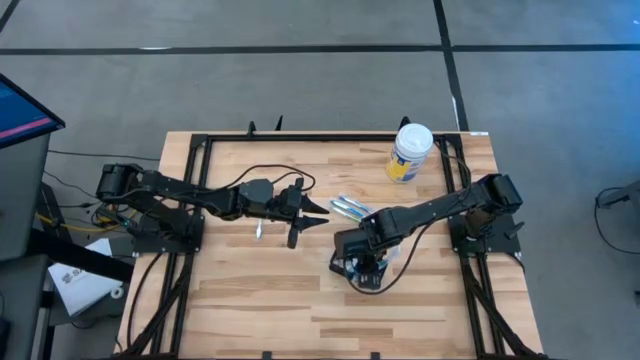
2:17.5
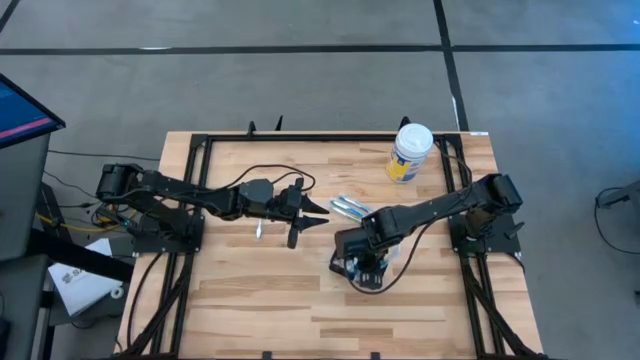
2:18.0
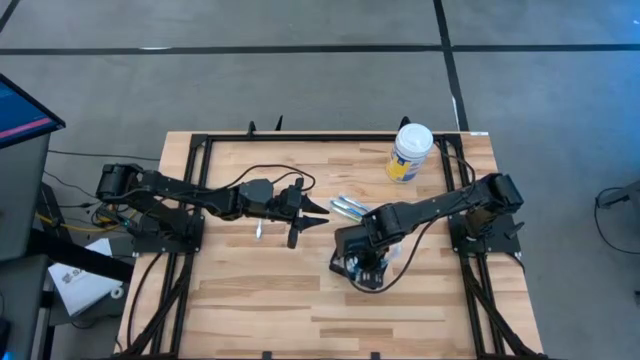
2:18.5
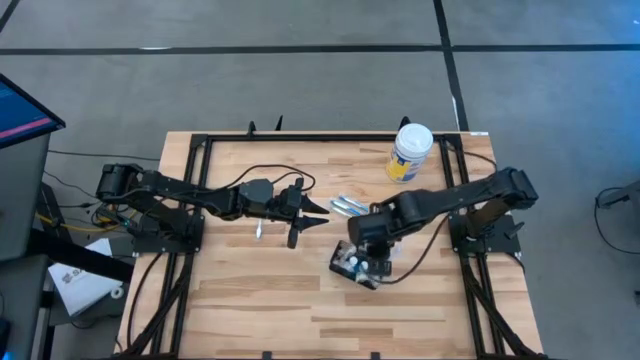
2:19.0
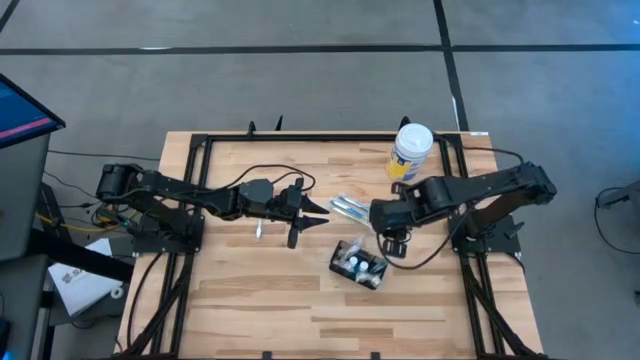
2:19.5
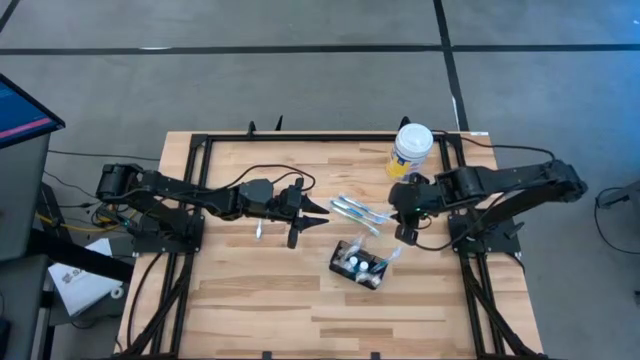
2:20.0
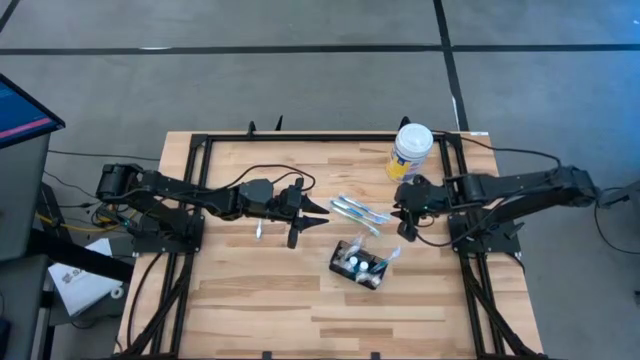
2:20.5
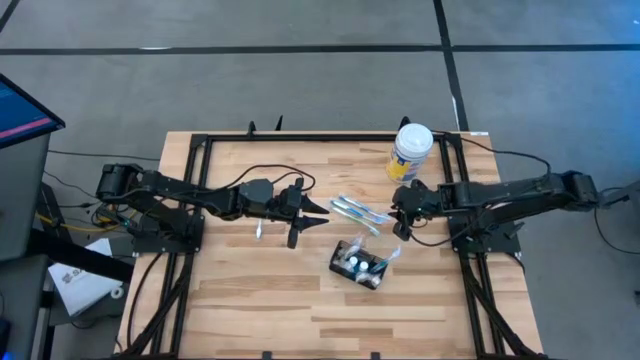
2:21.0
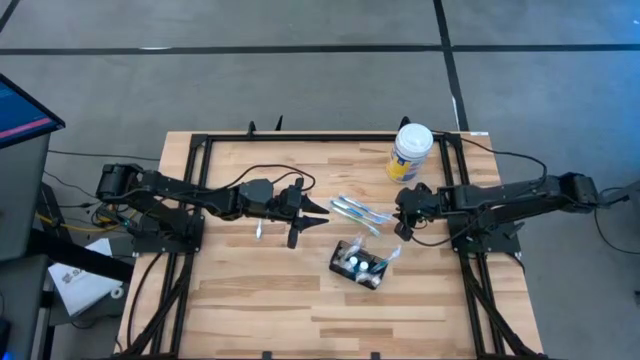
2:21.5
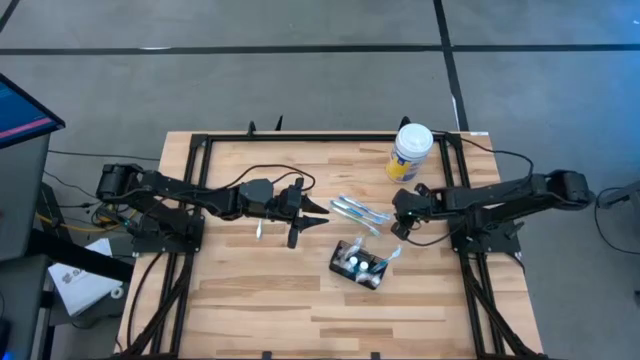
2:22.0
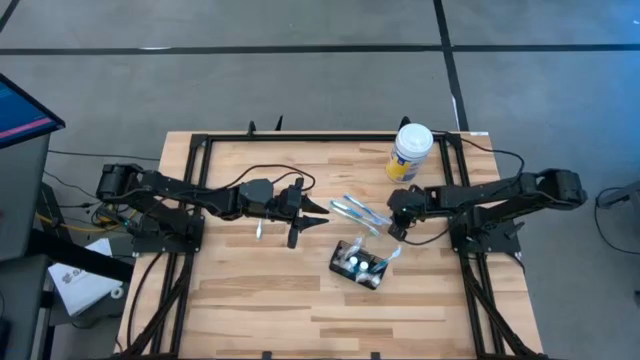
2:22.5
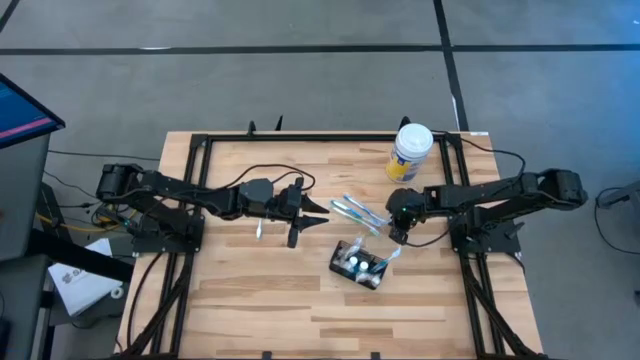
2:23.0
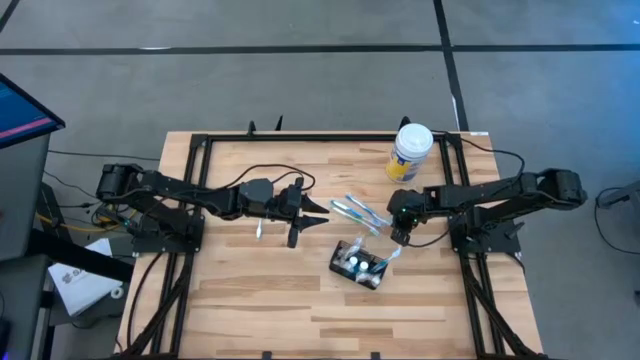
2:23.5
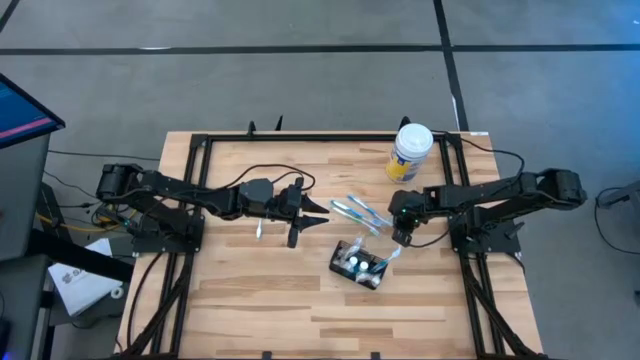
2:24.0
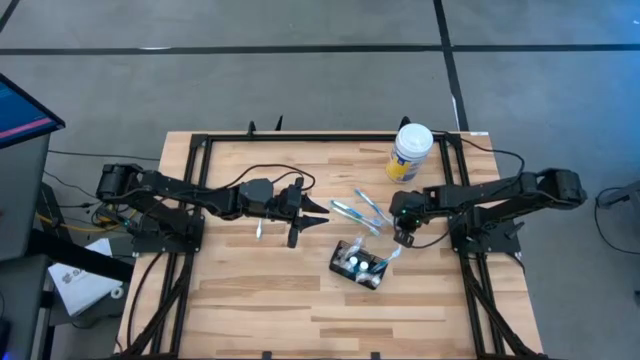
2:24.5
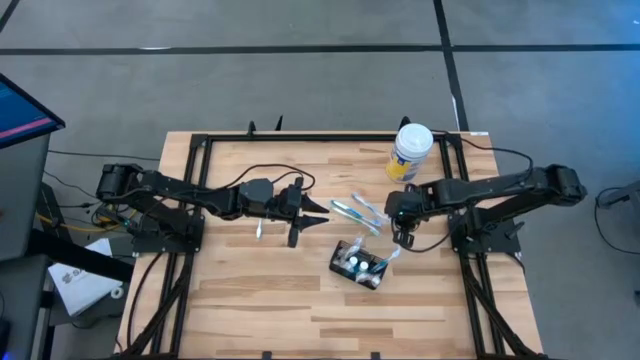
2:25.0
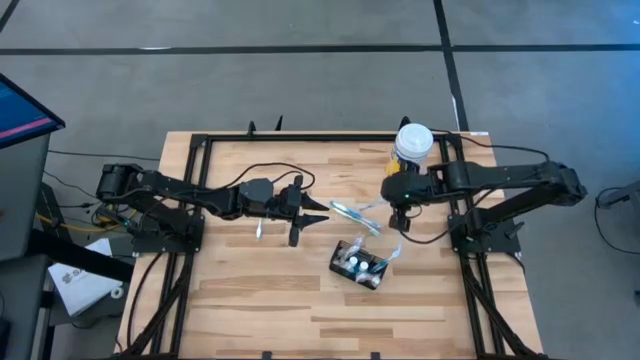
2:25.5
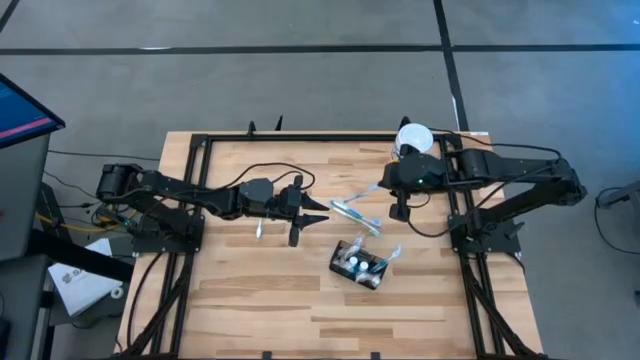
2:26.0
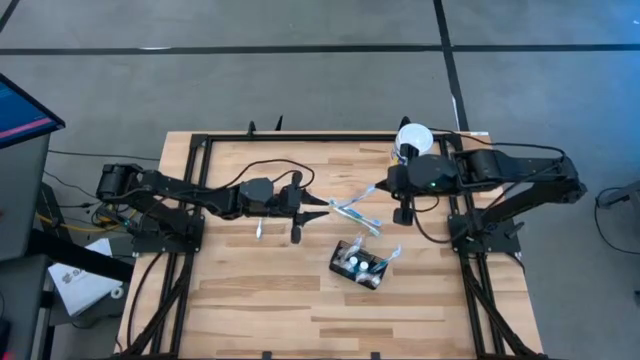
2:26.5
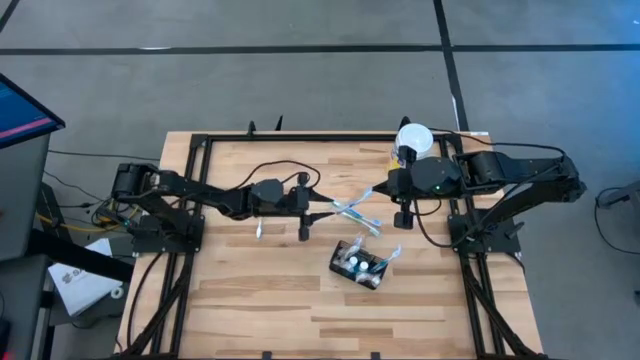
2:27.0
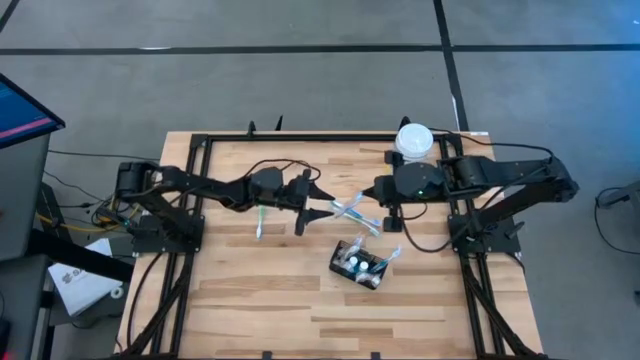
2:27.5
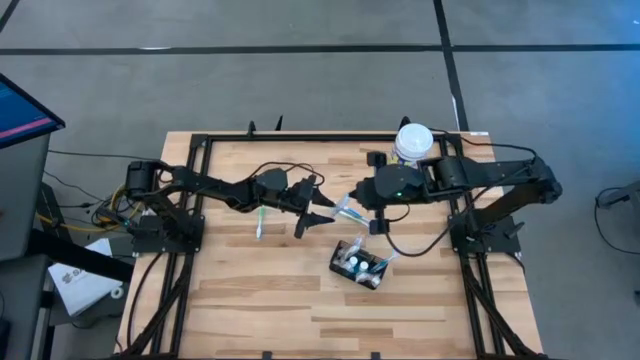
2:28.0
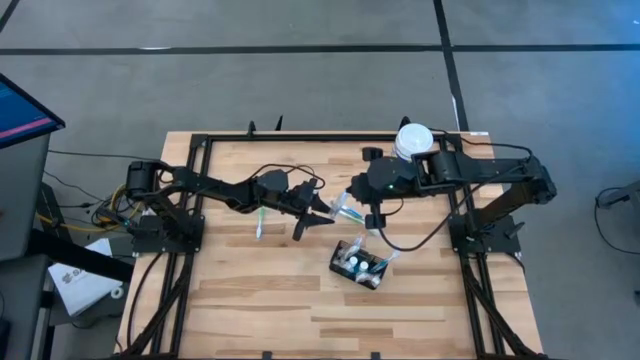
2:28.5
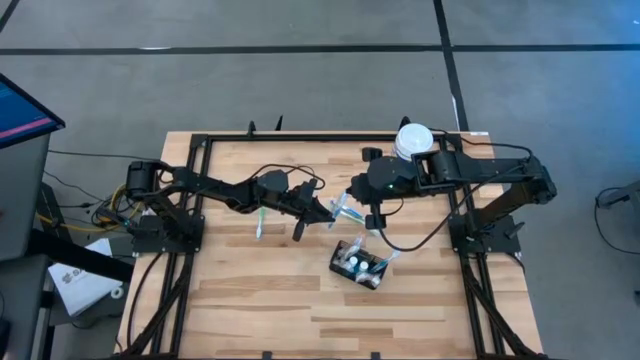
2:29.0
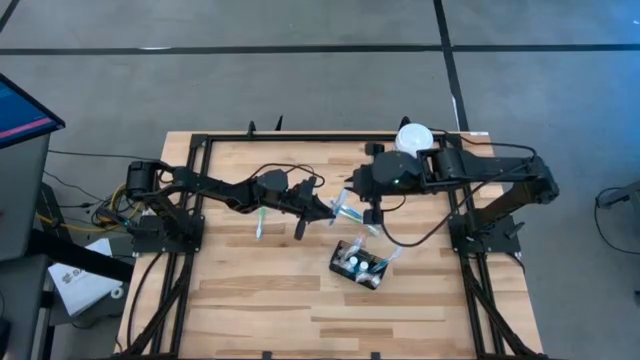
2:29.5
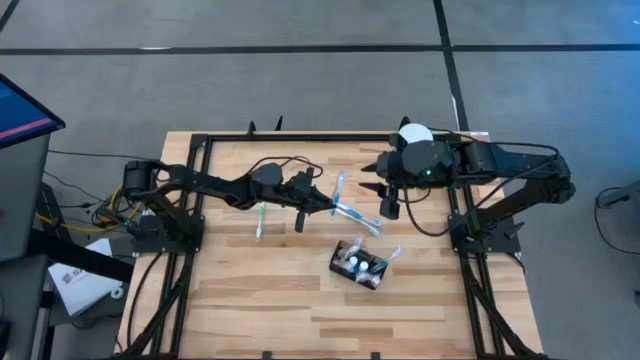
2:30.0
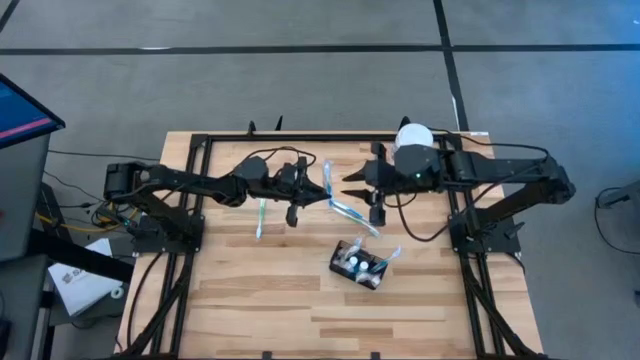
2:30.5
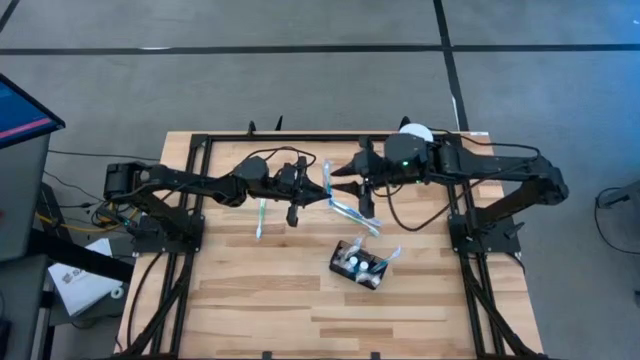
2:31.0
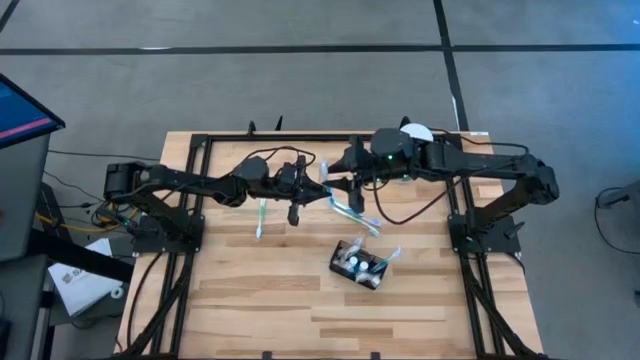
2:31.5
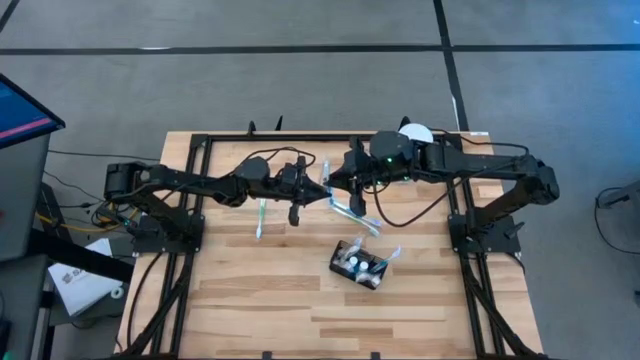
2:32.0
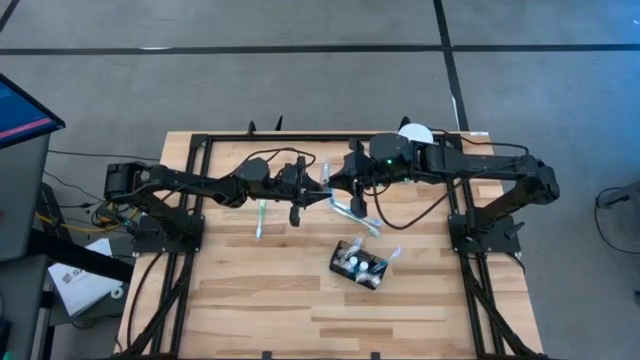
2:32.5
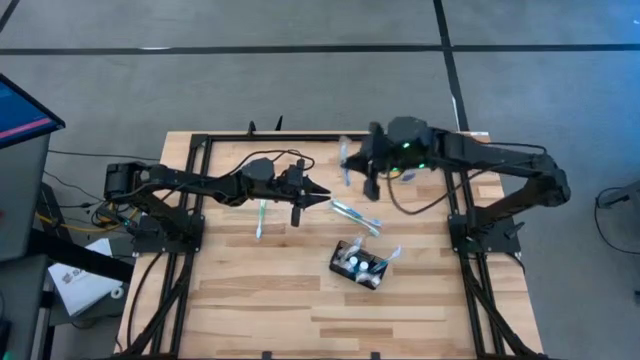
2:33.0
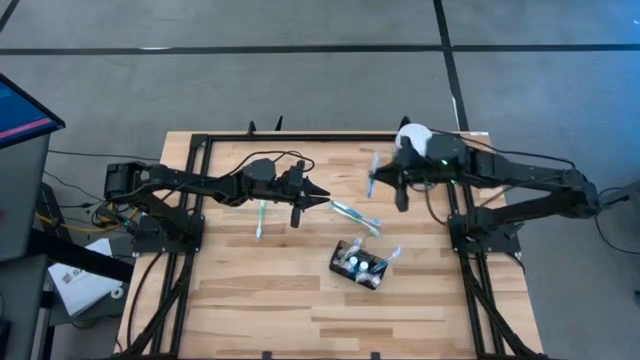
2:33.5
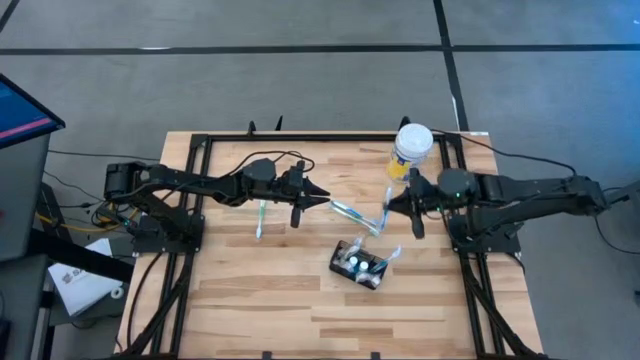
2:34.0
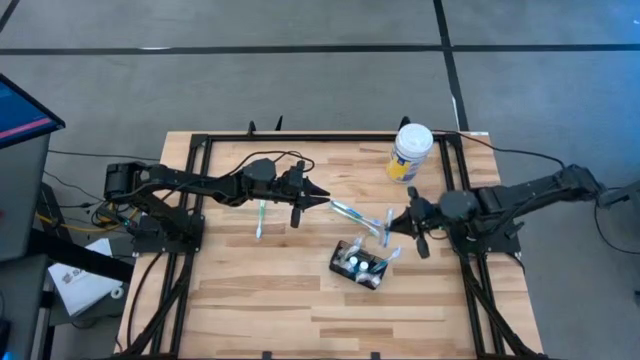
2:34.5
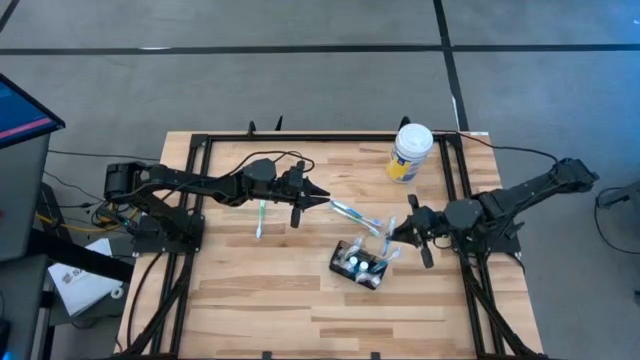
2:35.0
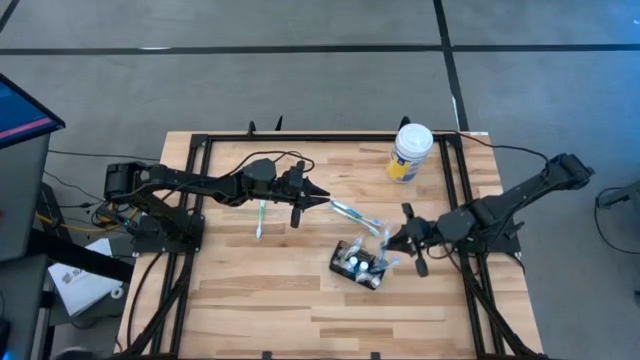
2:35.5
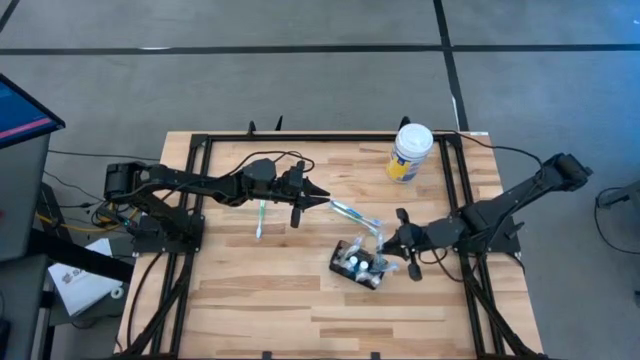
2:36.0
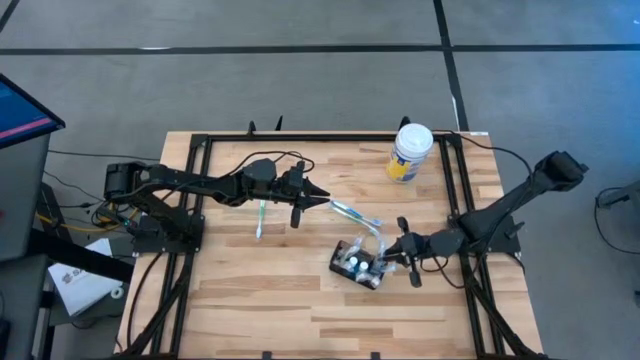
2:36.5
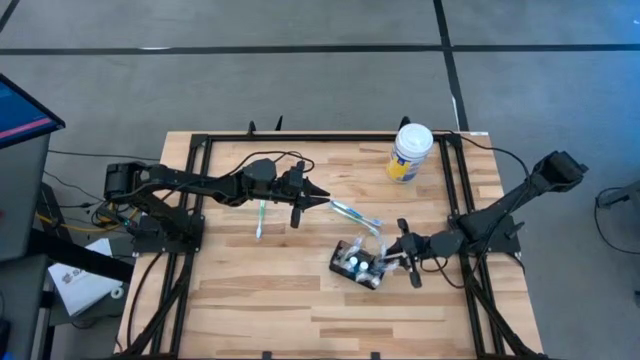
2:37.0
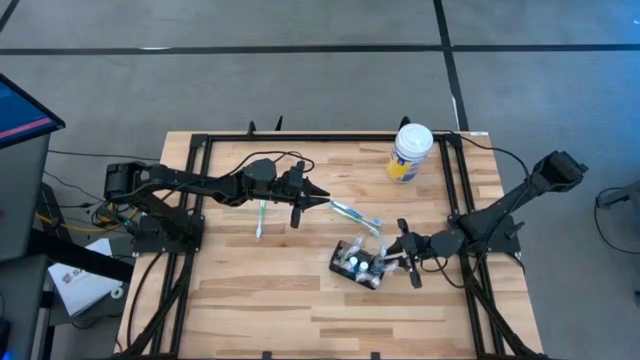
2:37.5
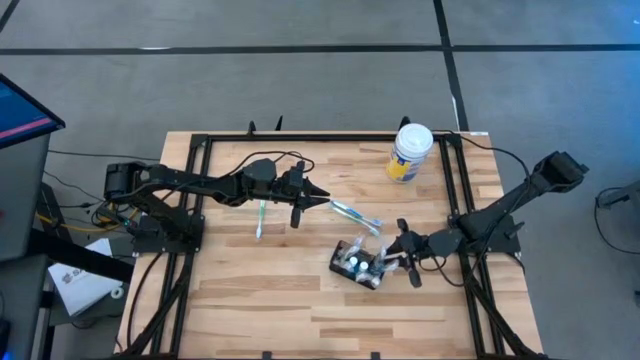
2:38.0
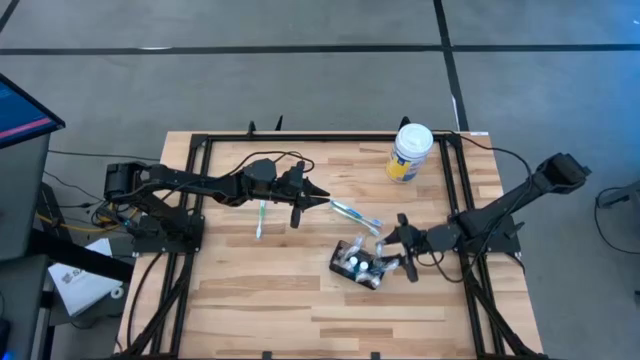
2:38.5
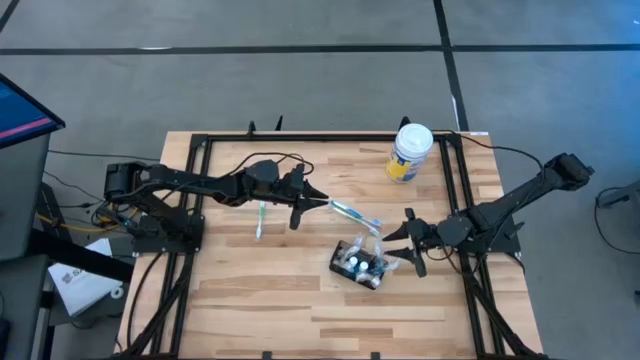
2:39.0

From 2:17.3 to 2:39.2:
Task: Pick & Place toothbrushing station
Put the top blue toothbrush into the mesh organizer with the other toothbrush
